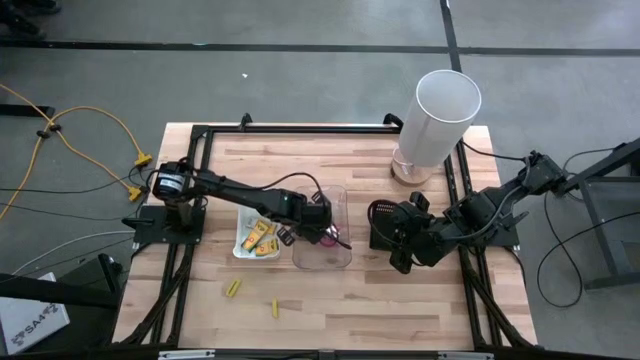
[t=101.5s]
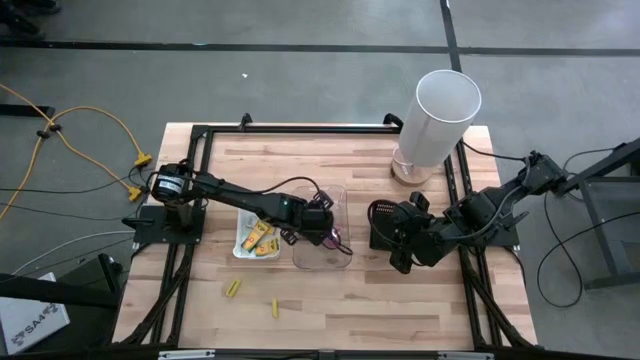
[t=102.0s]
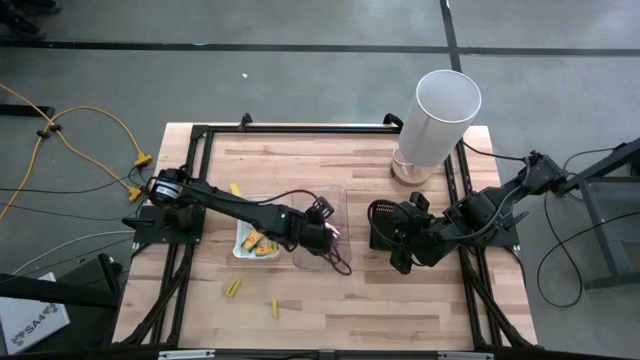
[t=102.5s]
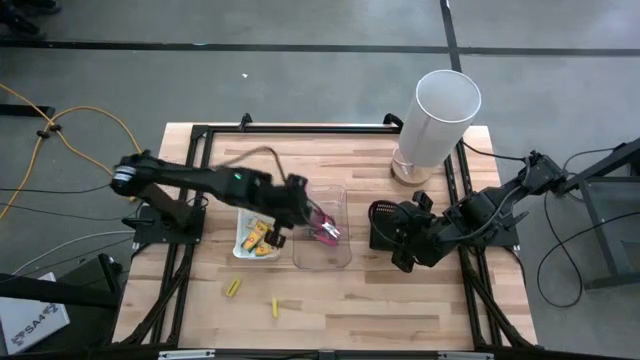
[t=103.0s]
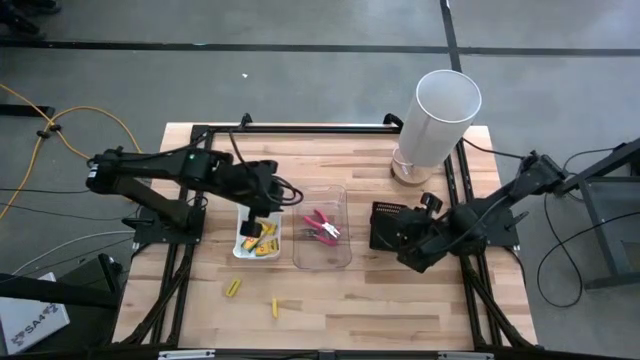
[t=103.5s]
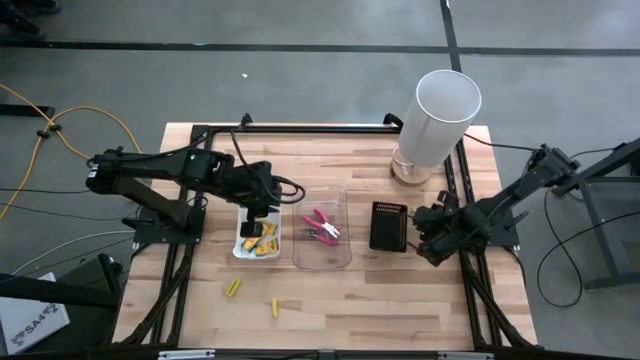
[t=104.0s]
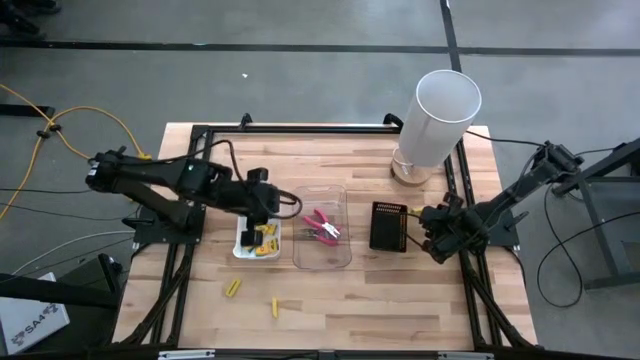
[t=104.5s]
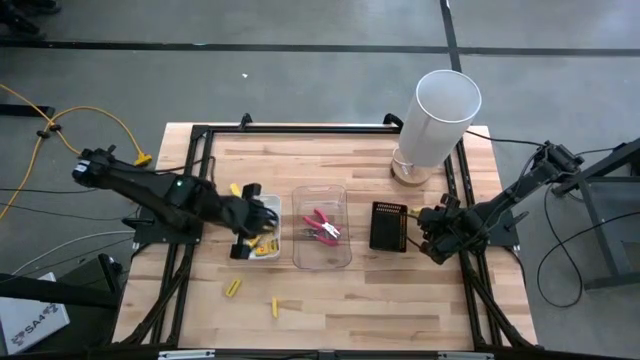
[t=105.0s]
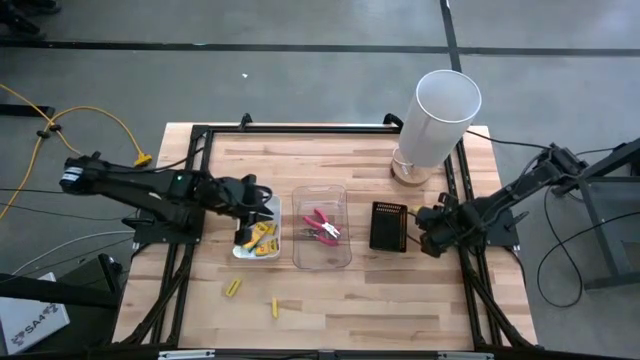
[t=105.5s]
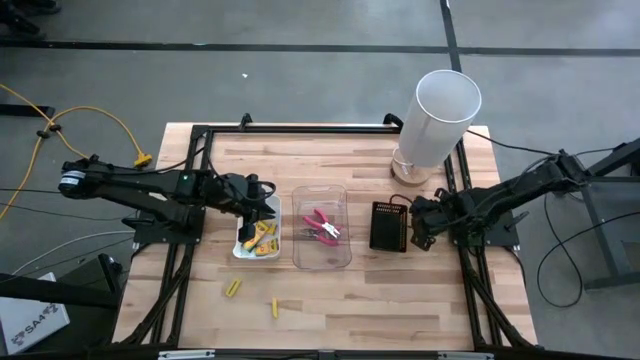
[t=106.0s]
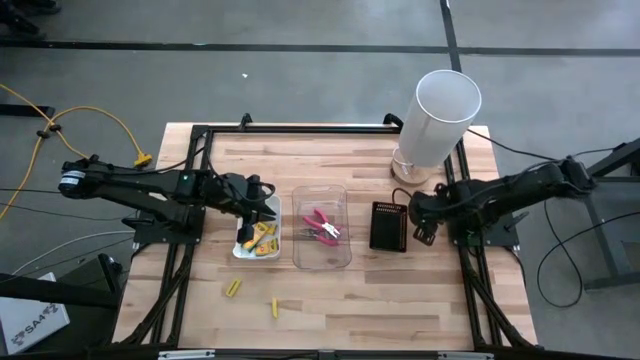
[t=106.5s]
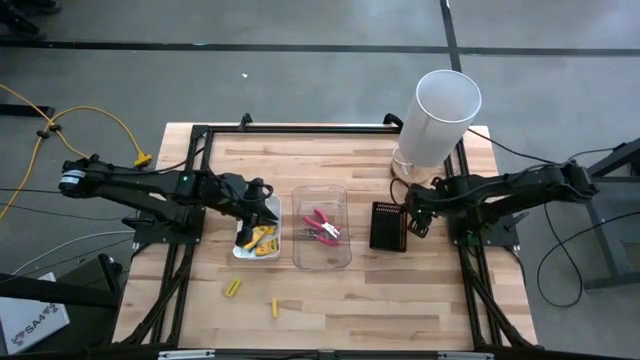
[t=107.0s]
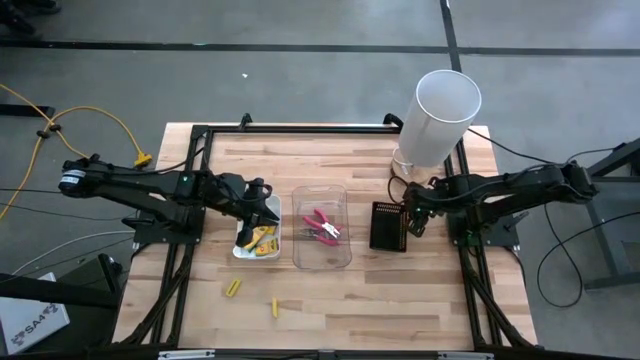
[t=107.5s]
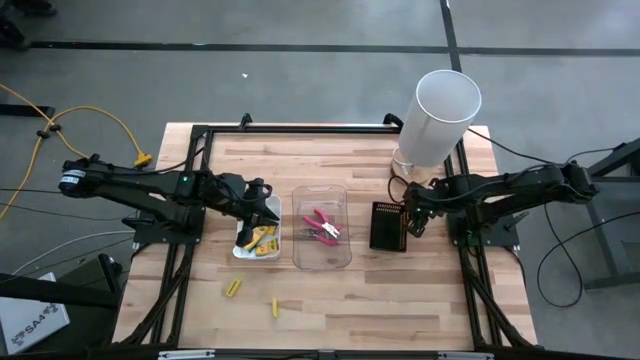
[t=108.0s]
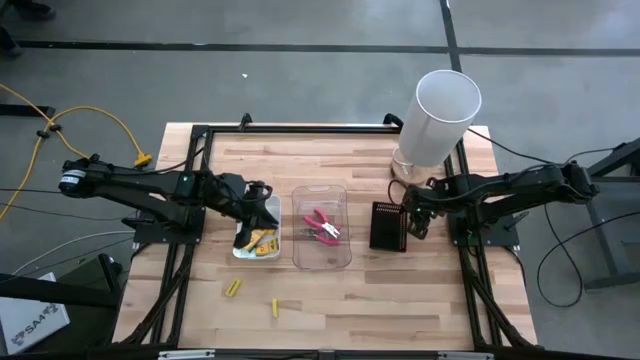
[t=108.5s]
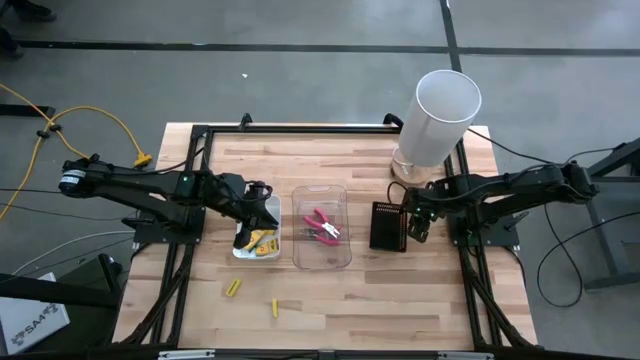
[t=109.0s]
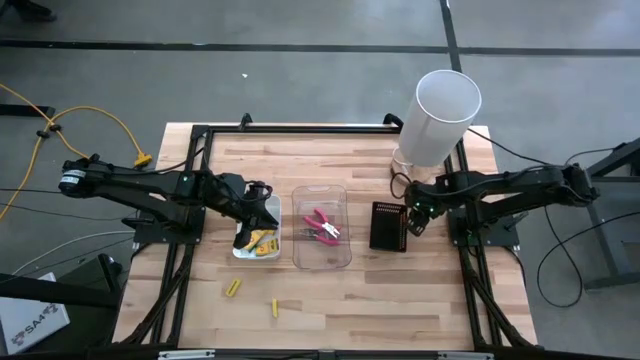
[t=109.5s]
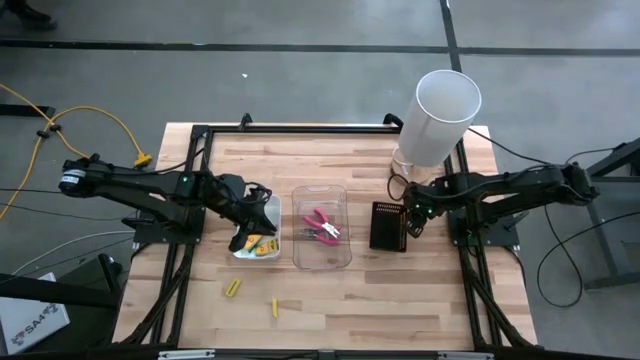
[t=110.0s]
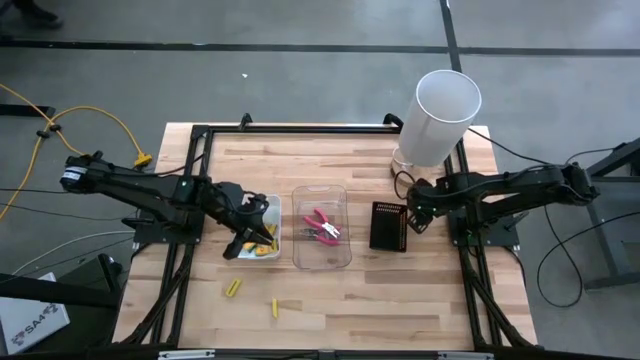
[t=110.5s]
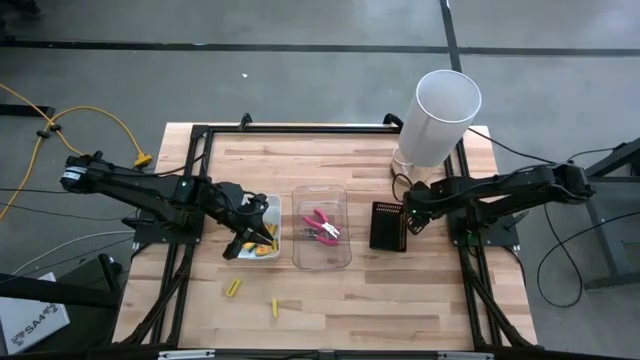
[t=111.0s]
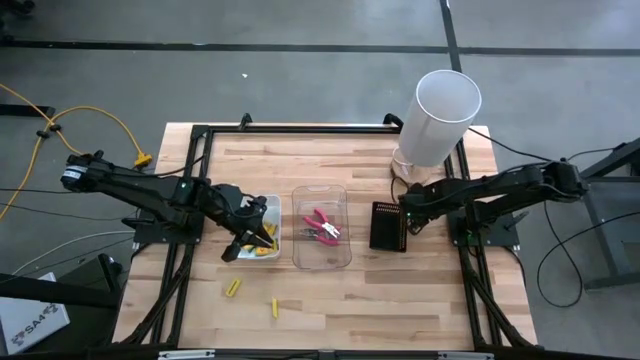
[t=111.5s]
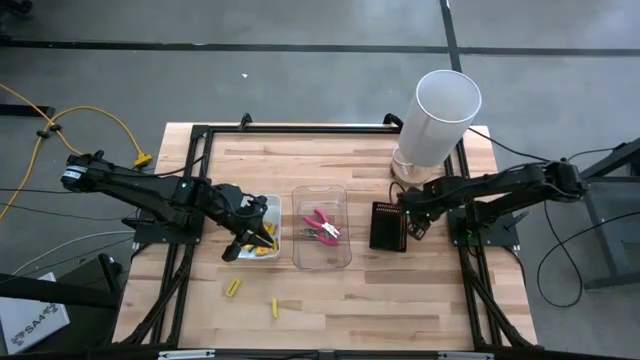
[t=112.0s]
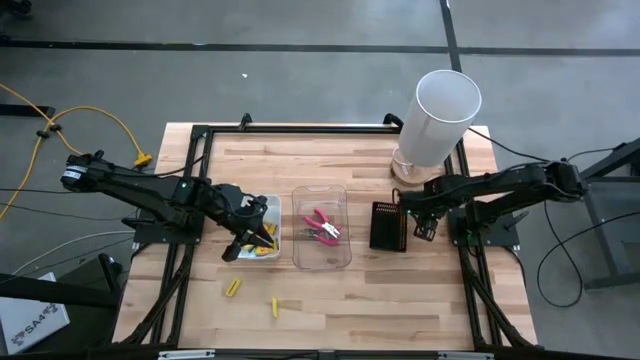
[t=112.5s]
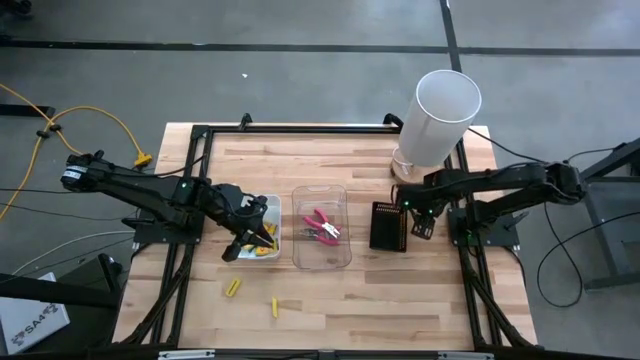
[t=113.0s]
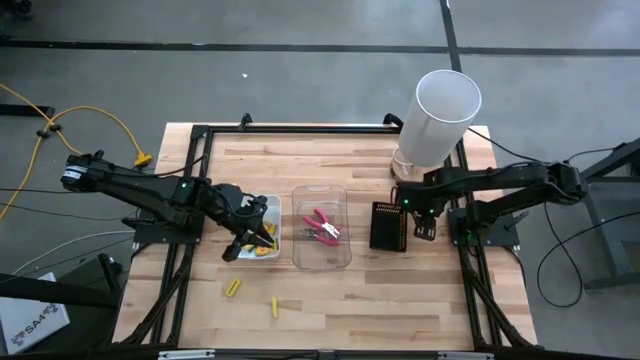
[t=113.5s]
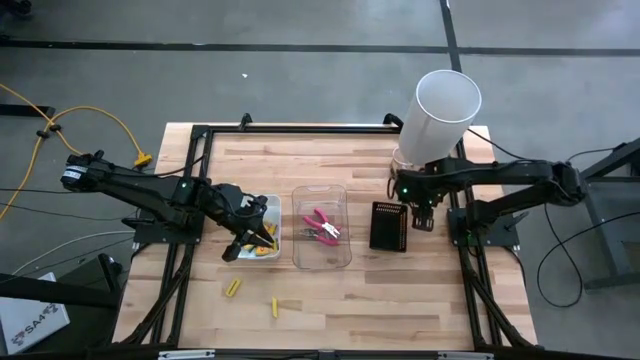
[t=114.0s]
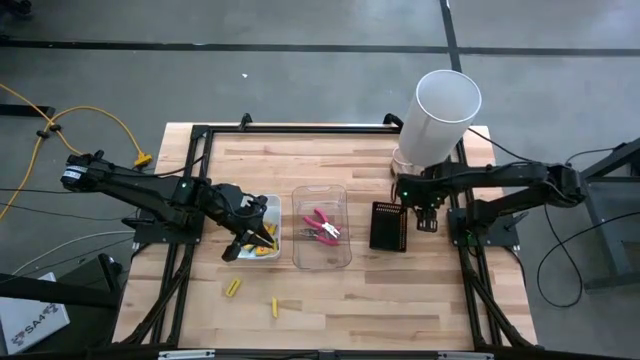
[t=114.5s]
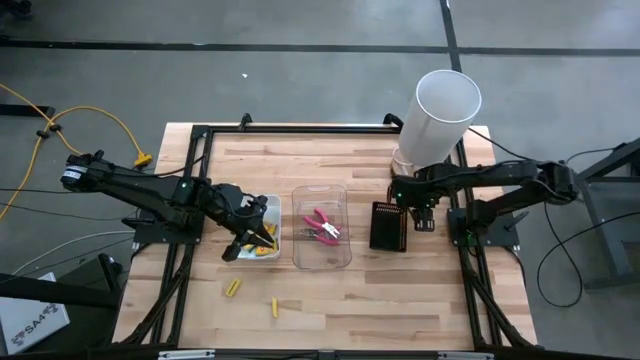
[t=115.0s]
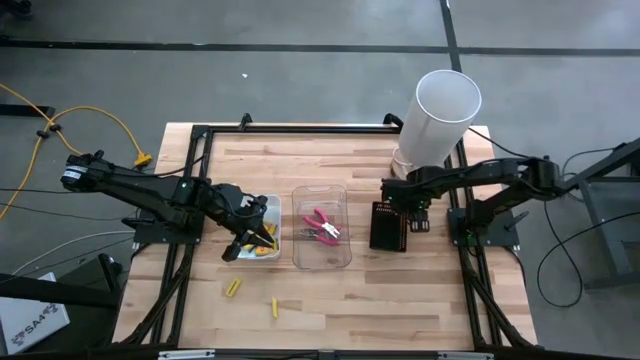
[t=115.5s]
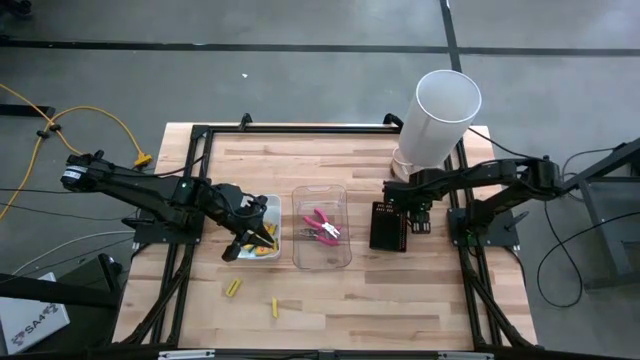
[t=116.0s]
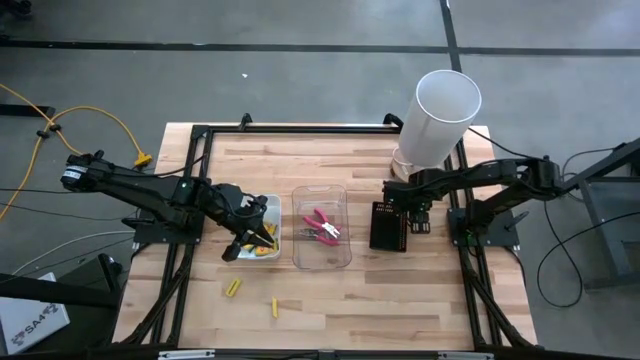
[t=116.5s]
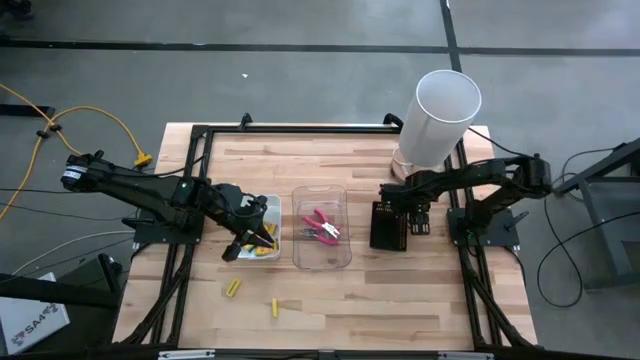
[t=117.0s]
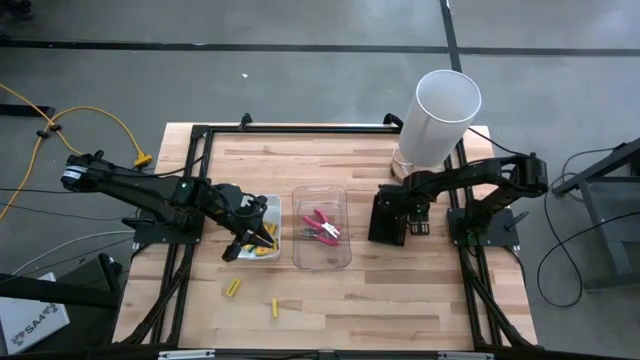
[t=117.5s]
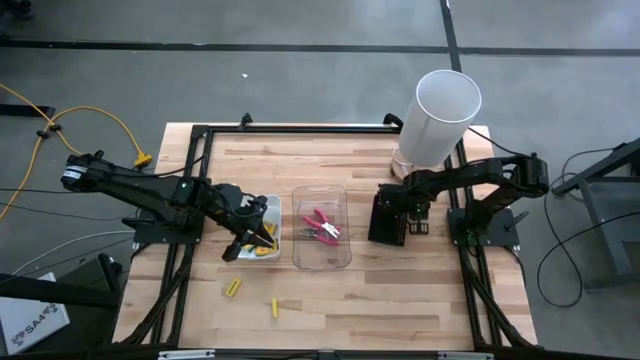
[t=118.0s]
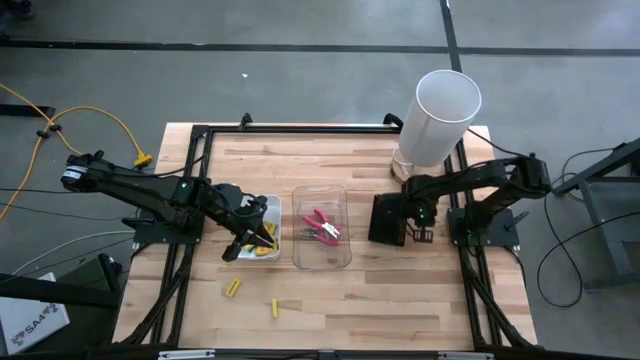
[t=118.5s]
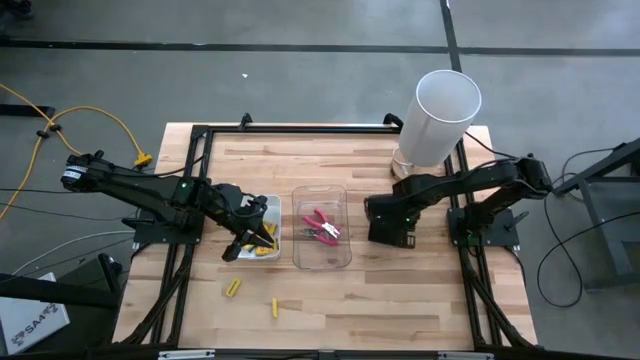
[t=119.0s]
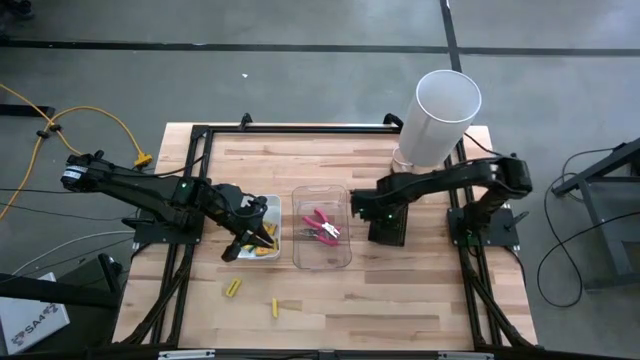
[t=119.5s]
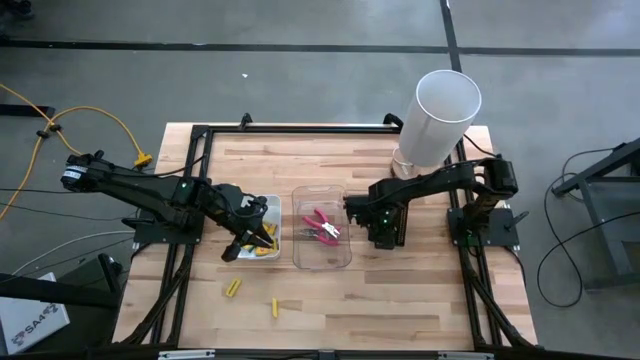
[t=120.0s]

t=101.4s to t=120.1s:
Task: Pick & Place School Supplies
Put the yellow eraser into the black basket

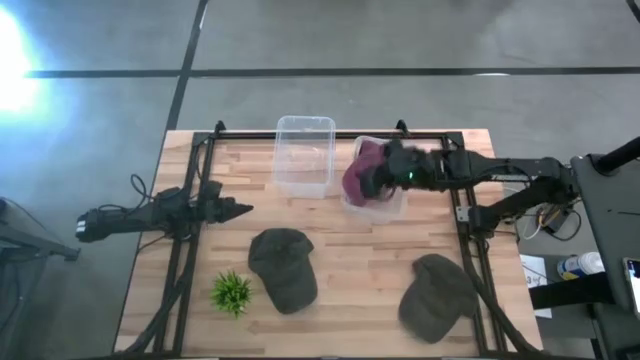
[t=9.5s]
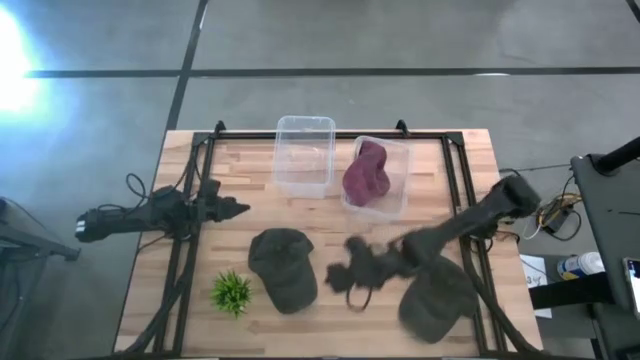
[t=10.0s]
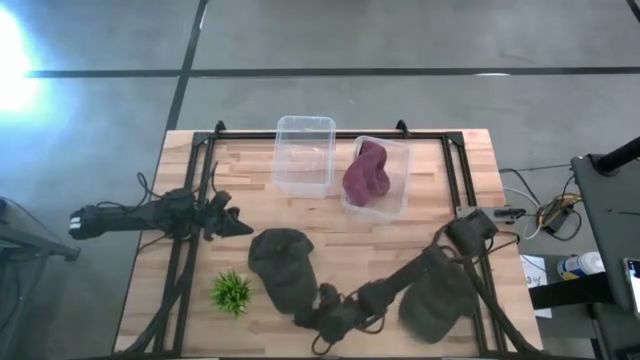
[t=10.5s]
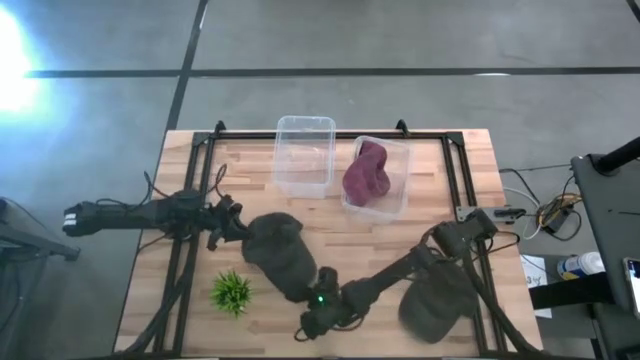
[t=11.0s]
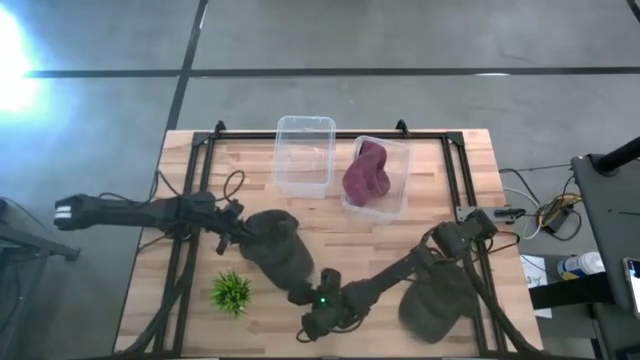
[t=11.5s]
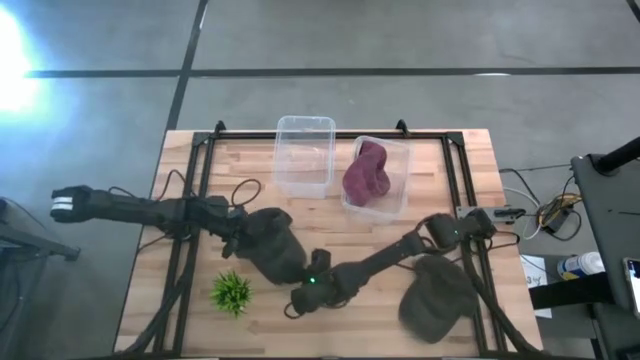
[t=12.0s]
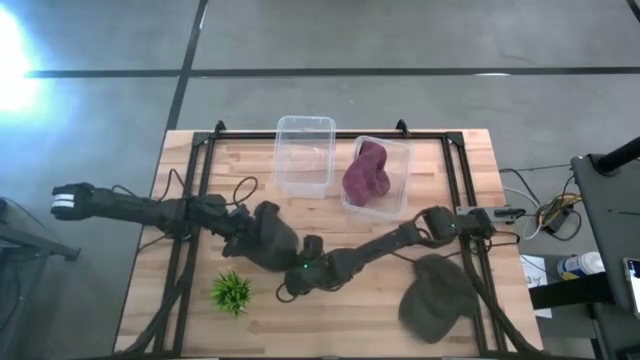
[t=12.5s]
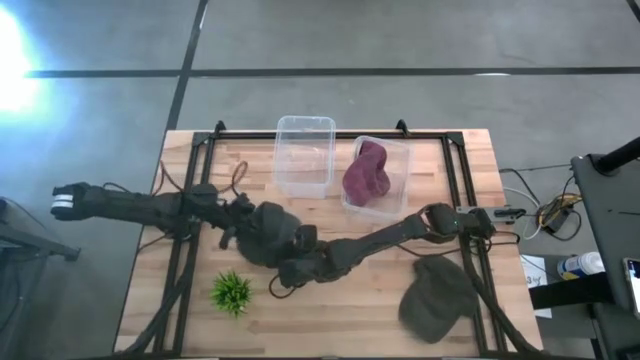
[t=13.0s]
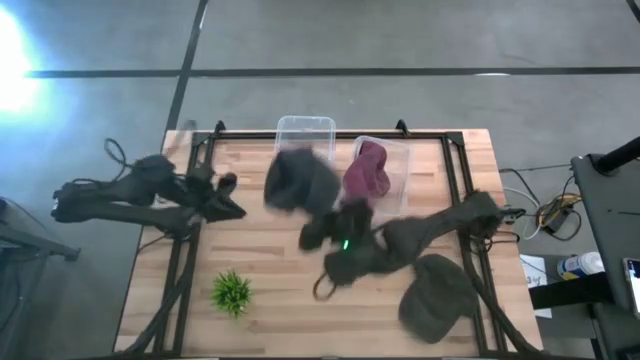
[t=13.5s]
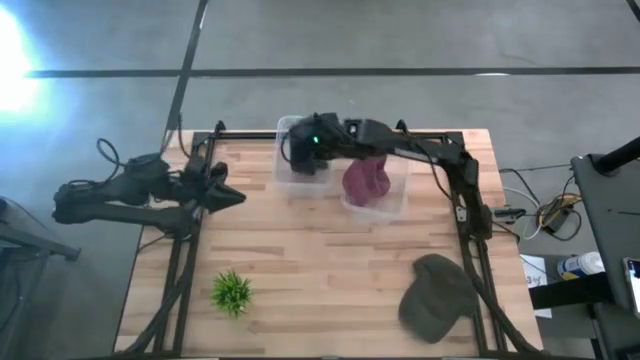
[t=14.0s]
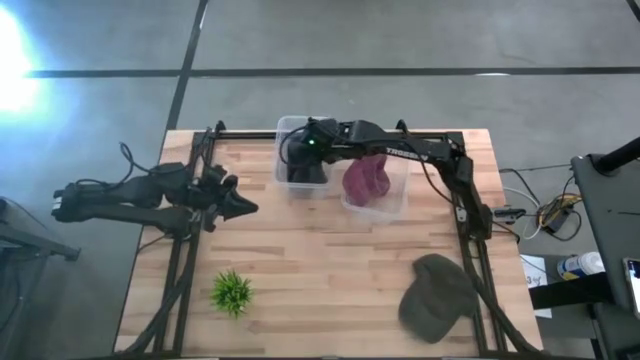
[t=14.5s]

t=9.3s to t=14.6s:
Task: Pick & Place hat
Put the left black cap into the left transparent bin
